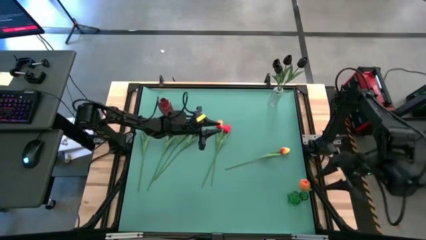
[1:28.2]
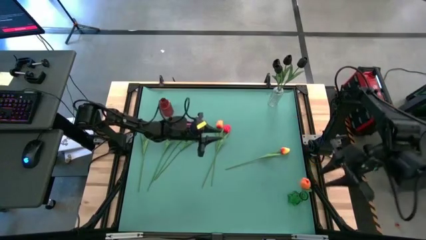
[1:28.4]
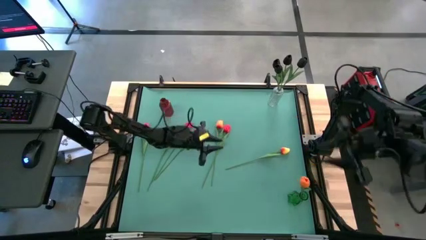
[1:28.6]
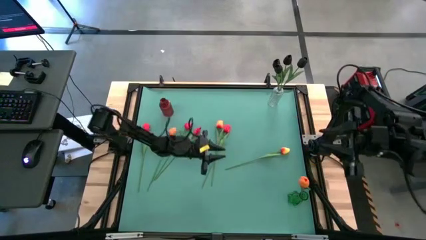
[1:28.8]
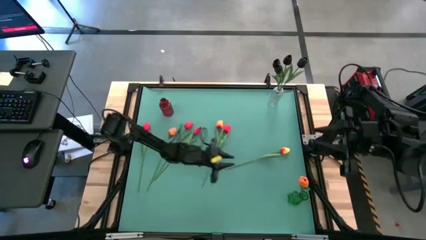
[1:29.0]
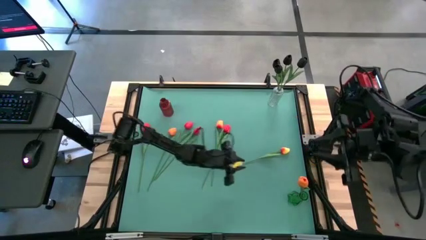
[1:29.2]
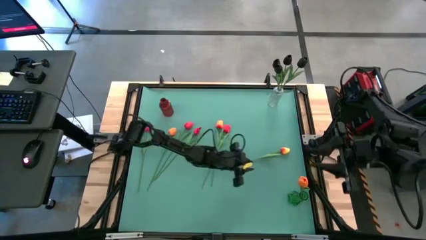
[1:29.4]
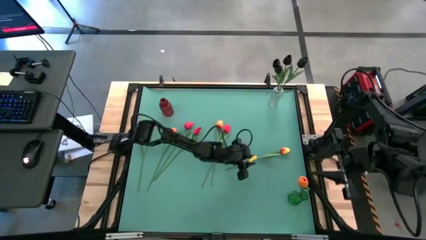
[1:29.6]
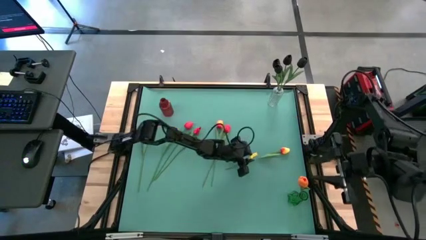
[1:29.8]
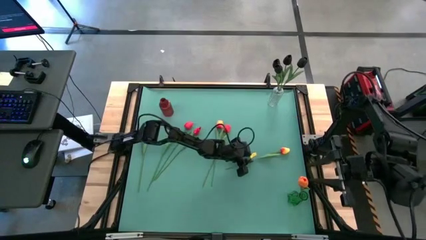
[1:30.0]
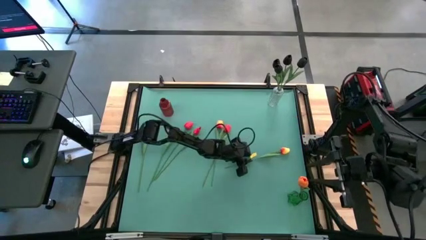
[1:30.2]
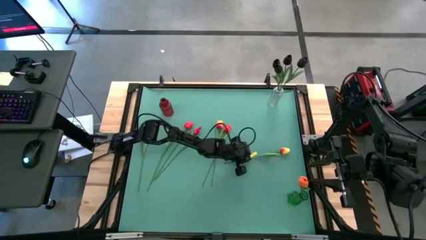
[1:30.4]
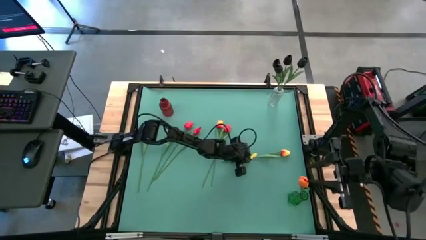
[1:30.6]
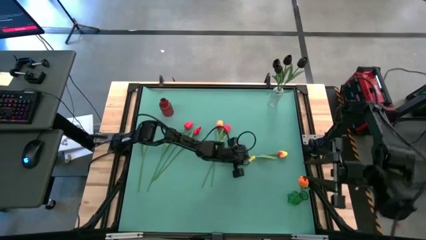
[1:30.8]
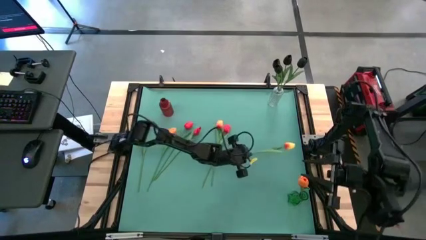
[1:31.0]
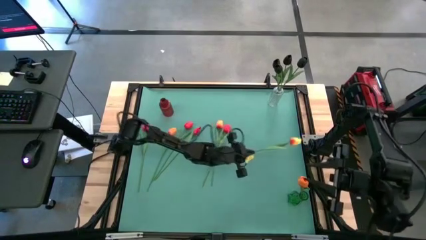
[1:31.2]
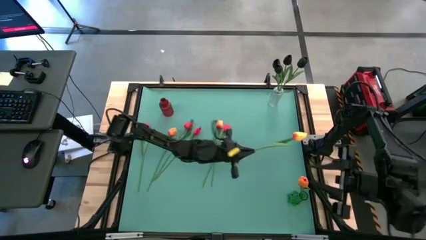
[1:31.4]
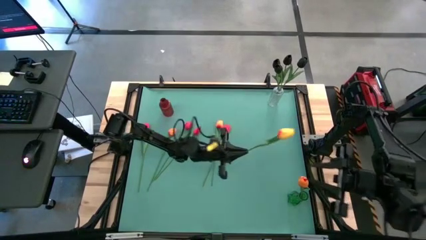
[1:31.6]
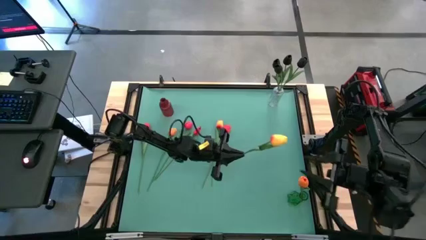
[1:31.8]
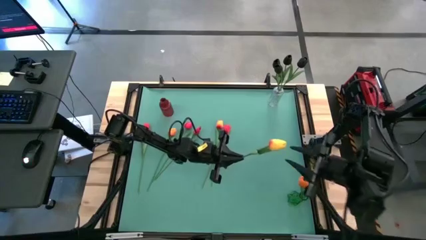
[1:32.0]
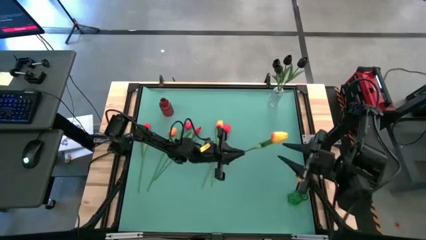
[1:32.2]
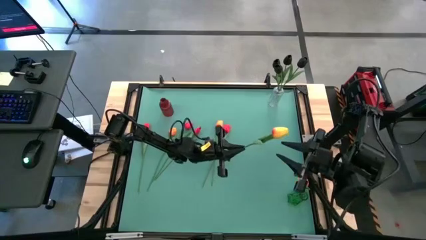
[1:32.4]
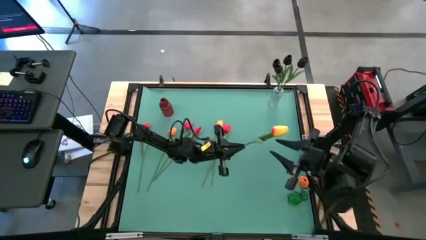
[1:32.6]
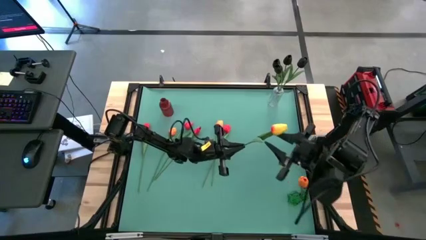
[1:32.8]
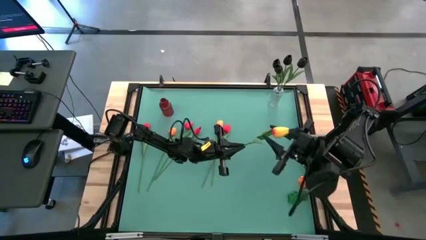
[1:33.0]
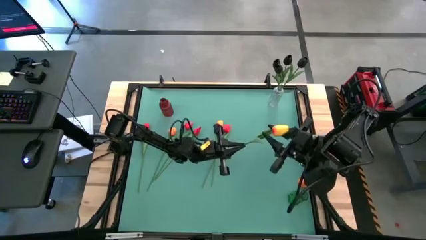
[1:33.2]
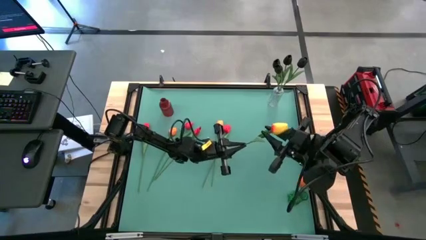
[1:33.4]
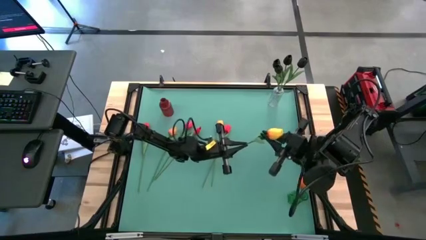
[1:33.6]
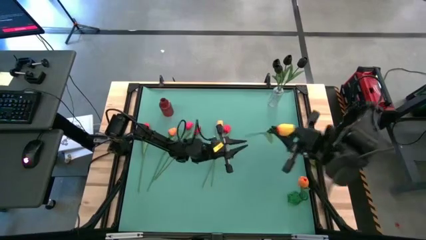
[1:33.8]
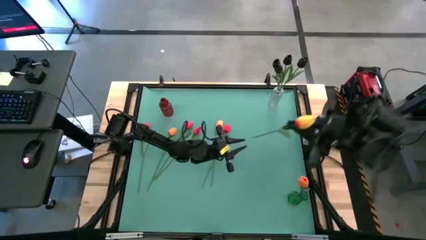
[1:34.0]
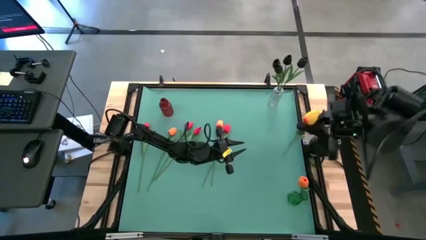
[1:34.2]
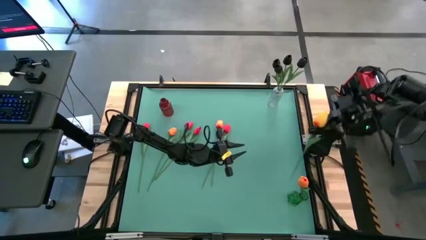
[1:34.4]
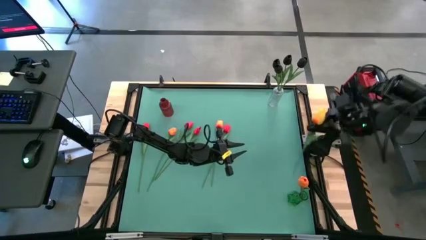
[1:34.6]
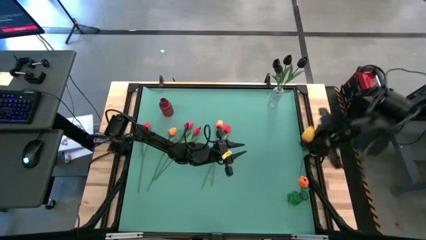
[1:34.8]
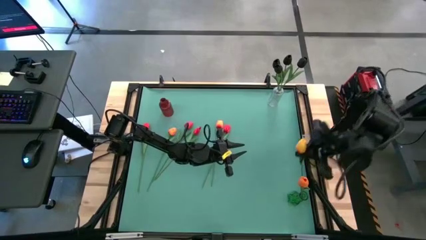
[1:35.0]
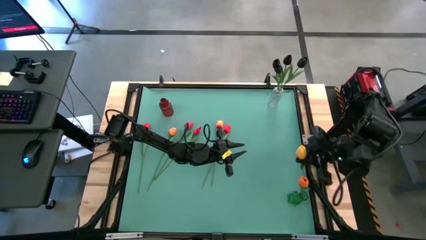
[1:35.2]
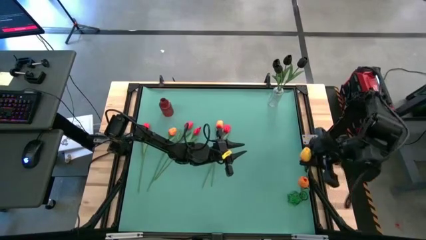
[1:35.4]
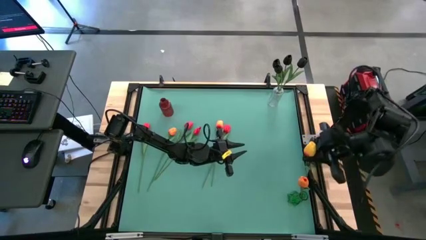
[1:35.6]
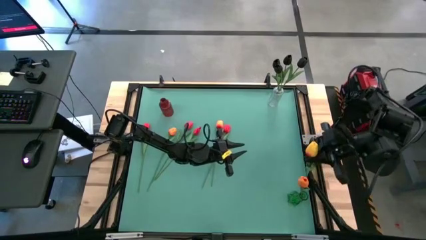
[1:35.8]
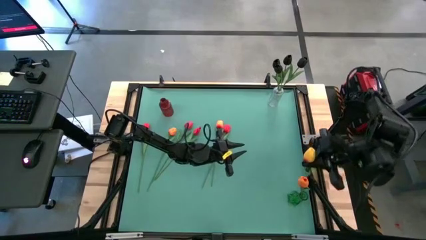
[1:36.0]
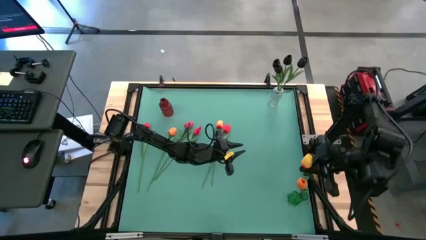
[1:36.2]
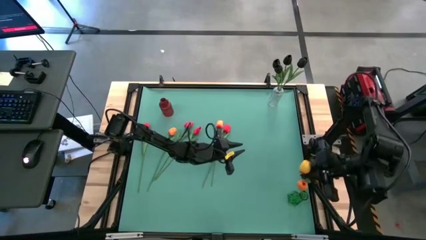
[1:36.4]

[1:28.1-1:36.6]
Task: Sort flowers into vase by color
Put the orange tulip into the green vase

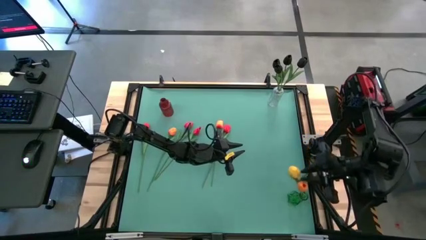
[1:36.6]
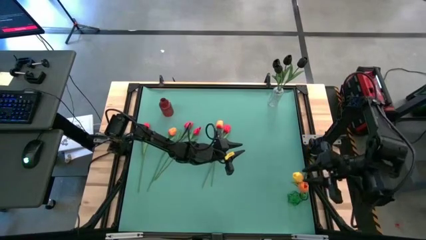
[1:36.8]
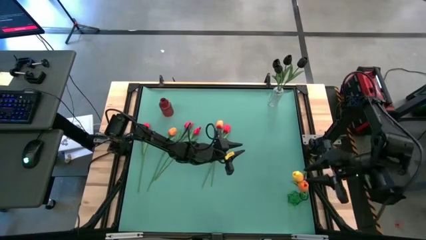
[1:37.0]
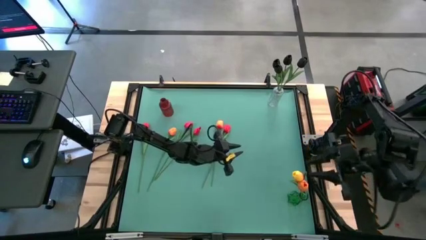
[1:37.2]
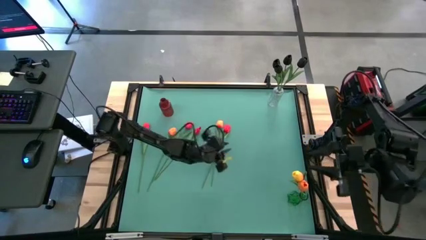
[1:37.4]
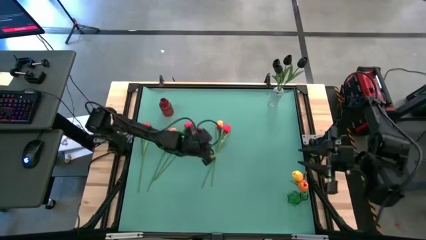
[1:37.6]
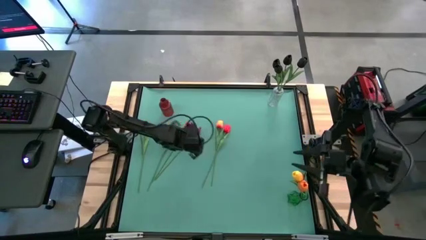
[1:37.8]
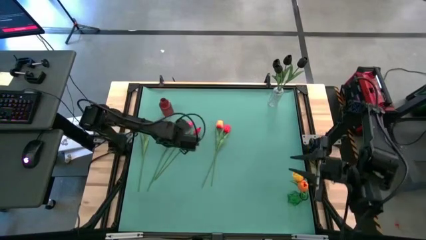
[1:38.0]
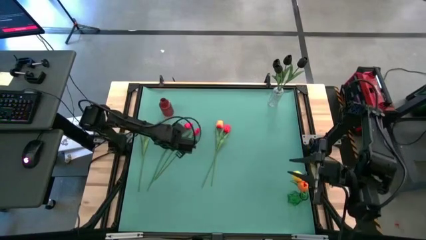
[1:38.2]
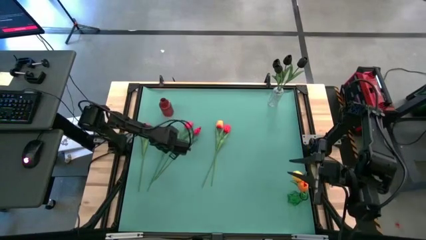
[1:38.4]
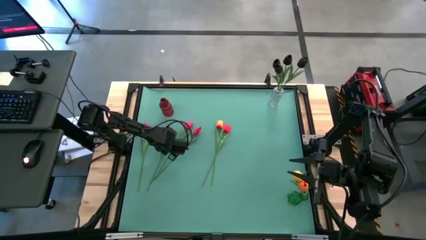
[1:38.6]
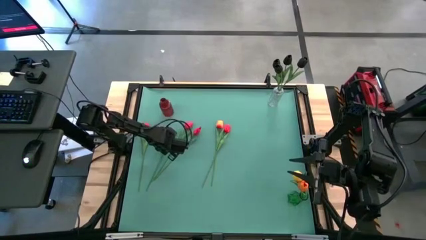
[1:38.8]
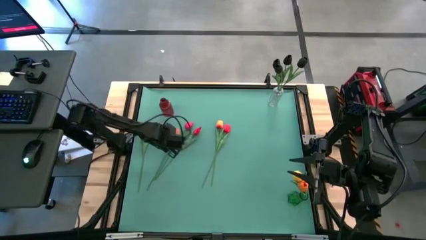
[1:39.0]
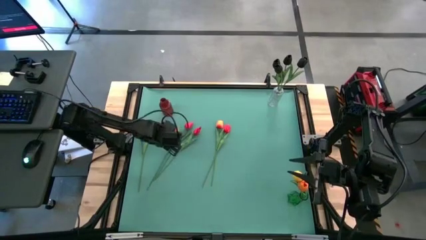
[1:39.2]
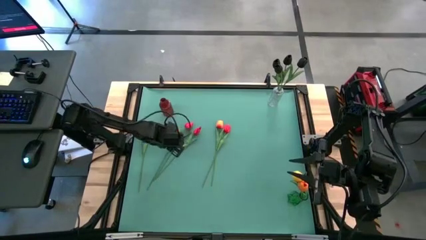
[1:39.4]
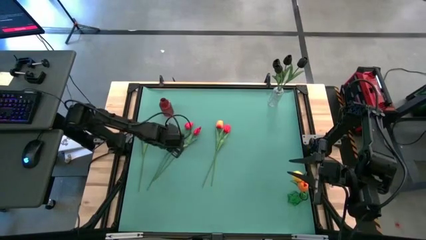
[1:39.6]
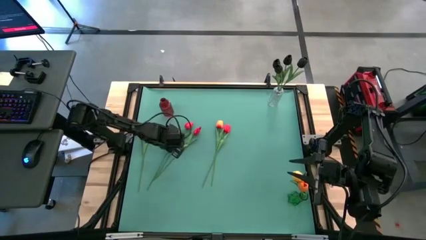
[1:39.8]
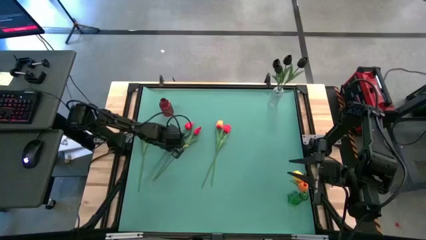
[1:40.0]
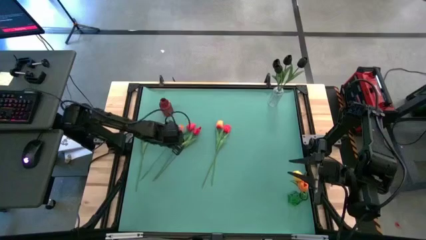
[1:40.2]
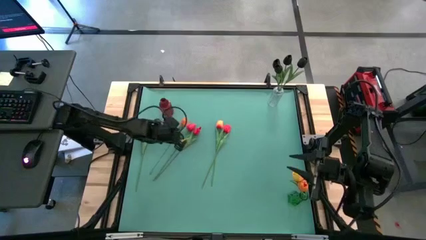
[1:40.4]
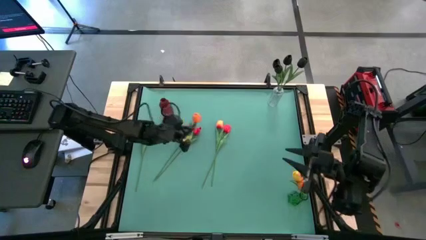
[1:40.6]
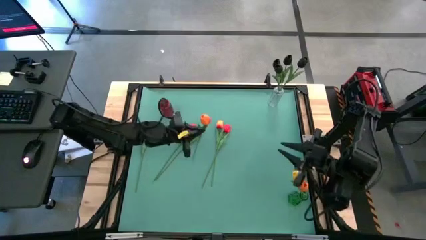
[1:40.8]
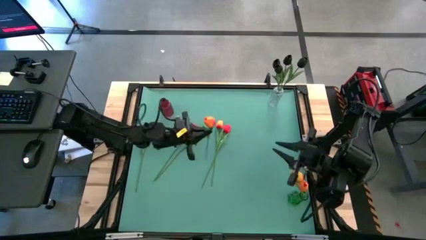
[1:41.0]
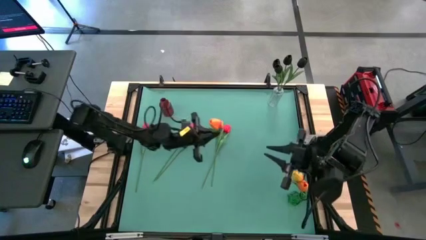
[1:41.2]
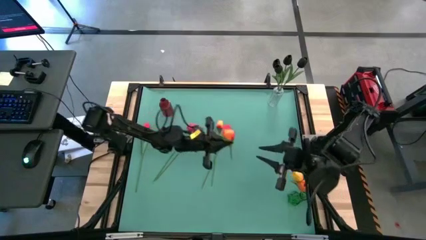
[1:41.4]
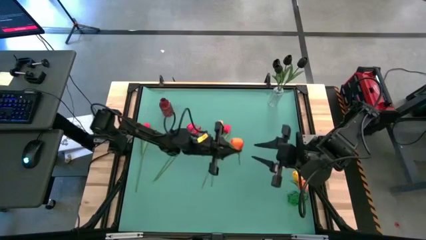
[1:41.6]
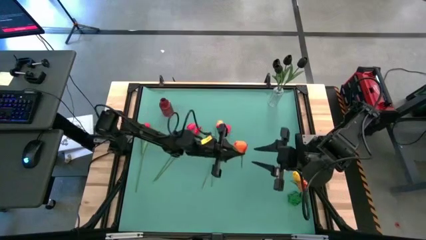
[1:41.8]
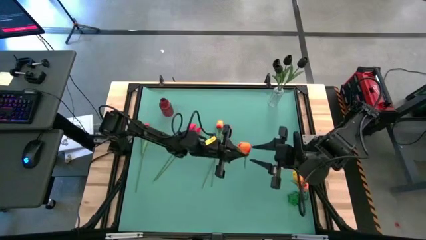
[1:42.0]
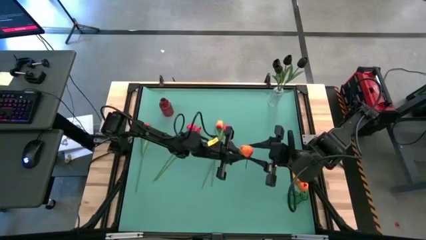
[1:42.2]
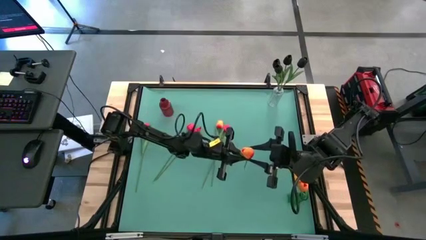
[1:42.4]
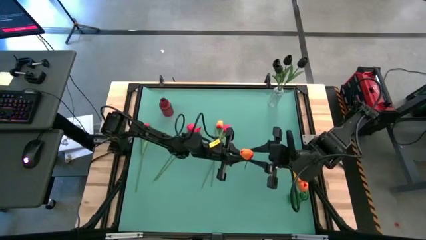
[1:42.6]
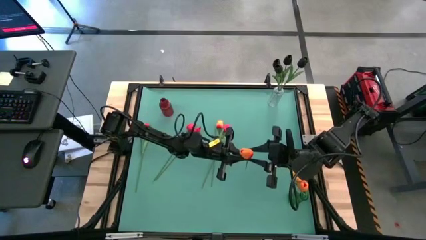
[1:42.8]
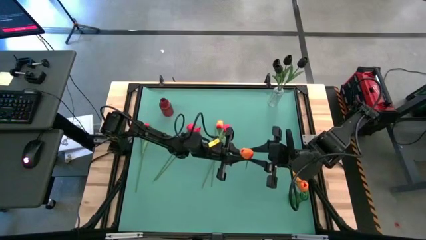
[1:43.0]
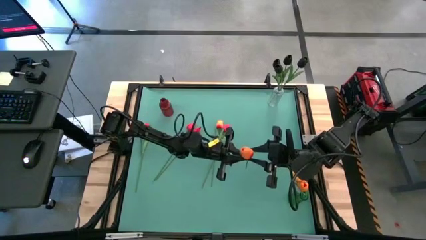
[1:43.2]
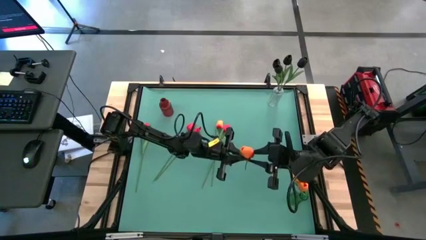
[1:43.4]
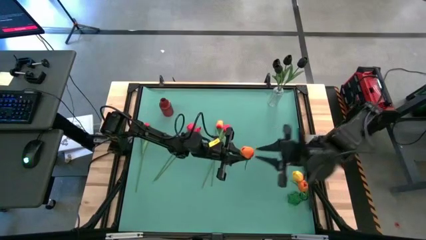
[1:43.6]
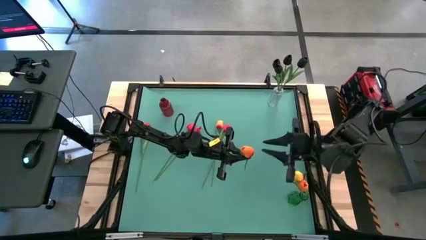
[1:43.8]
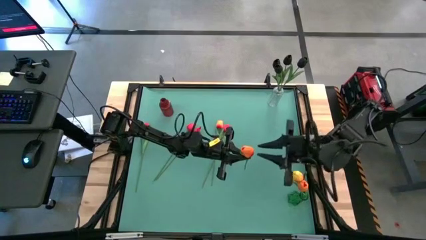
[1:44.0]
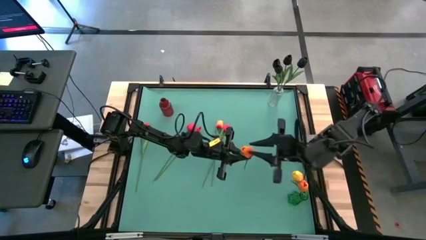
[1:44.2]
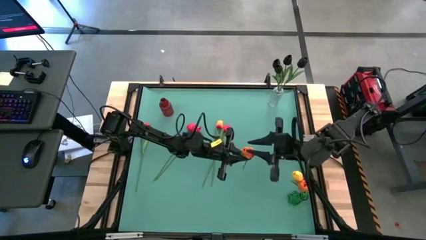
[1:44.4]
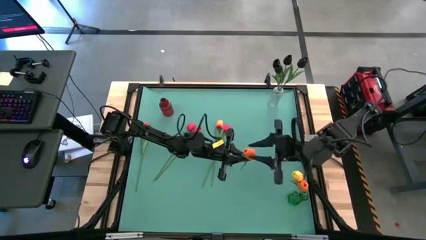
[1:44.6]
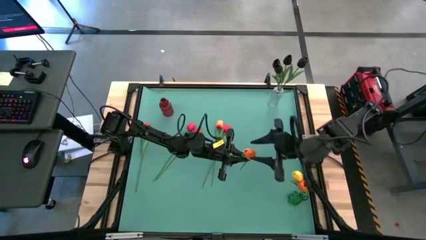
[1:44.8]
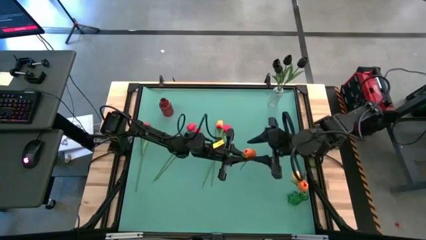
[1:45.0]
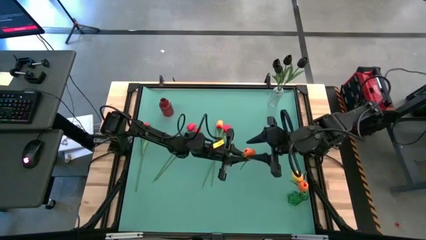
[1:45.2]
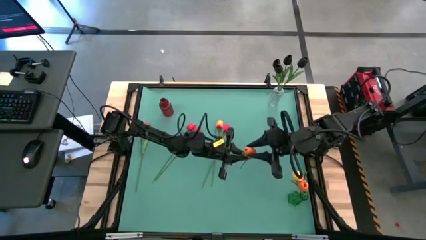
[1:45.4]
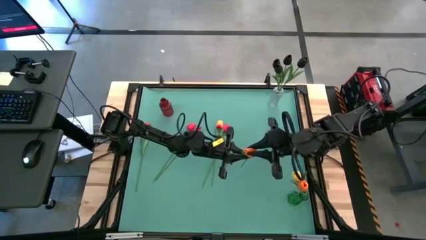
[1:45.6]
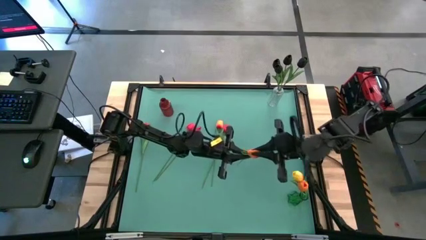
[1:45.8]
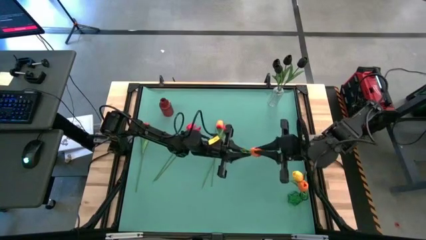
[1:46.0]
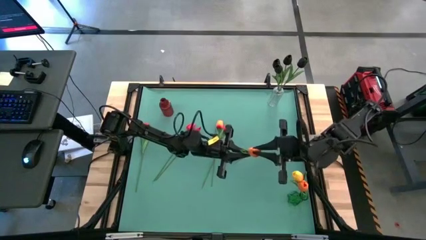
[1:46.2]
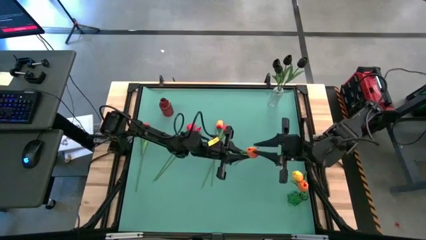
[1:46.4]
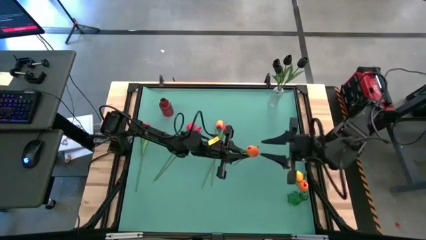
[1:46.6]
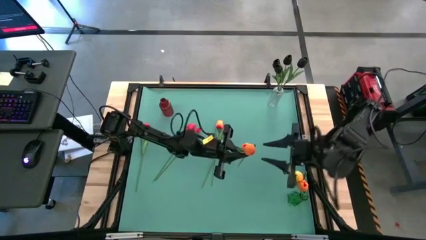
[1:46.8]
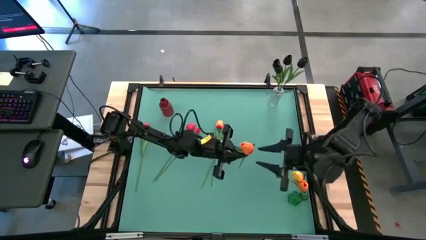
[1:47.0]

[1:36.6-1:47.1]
Put the orange tulip into the green vase
